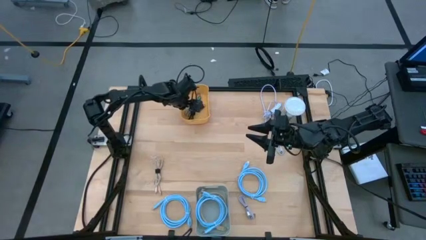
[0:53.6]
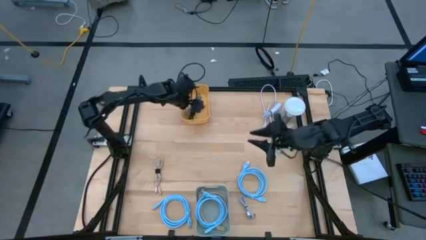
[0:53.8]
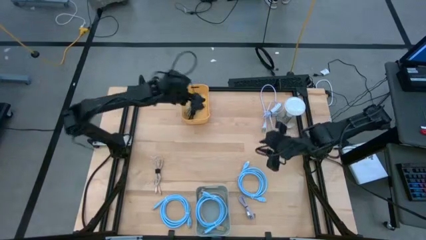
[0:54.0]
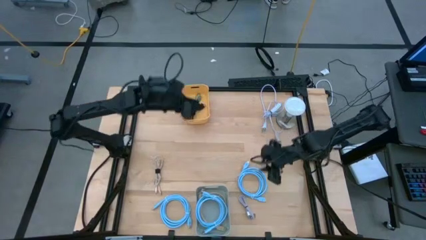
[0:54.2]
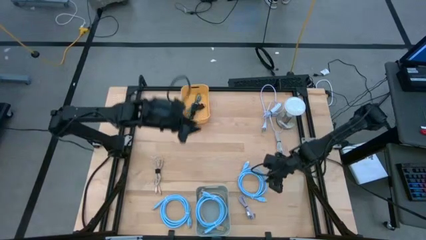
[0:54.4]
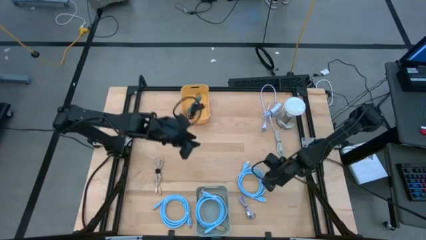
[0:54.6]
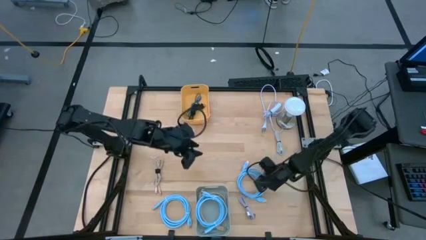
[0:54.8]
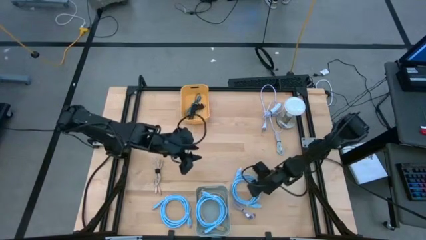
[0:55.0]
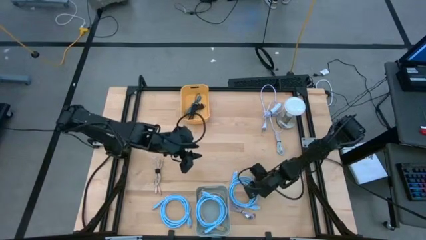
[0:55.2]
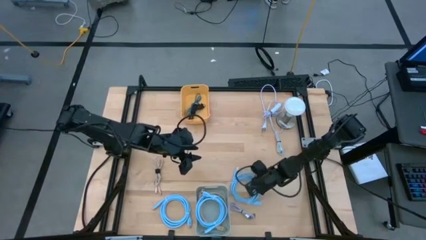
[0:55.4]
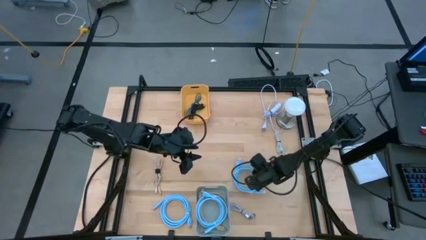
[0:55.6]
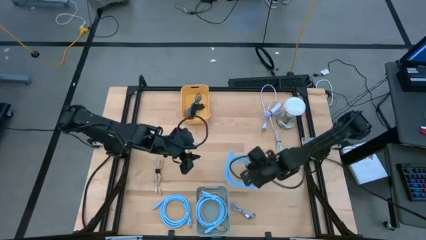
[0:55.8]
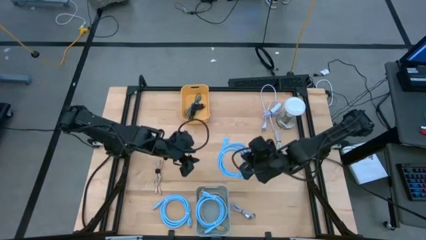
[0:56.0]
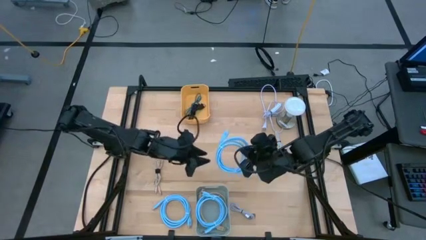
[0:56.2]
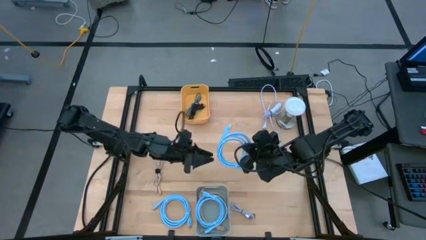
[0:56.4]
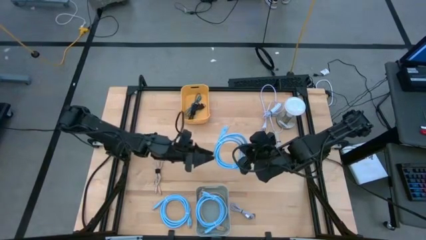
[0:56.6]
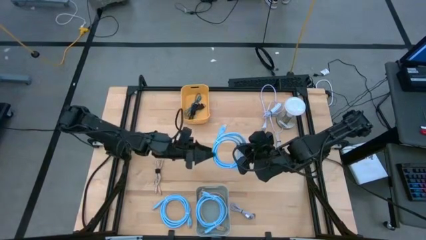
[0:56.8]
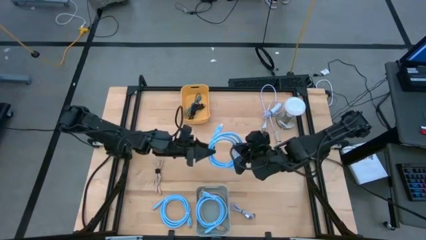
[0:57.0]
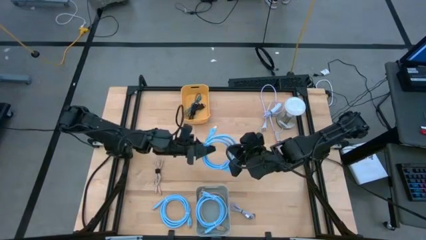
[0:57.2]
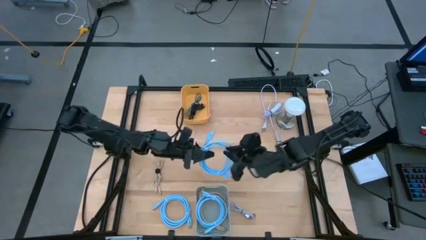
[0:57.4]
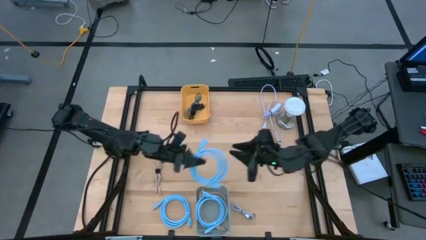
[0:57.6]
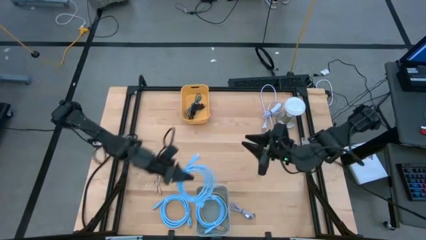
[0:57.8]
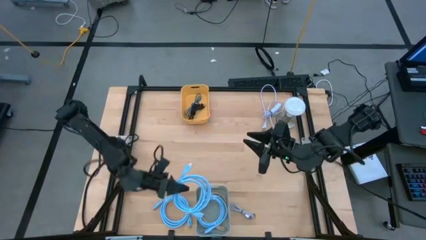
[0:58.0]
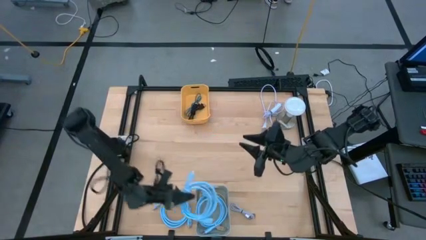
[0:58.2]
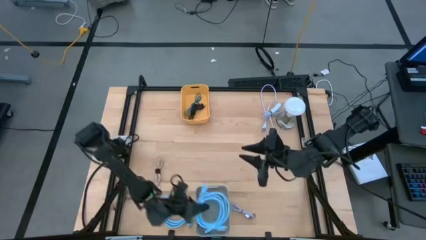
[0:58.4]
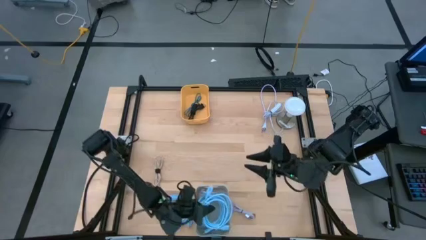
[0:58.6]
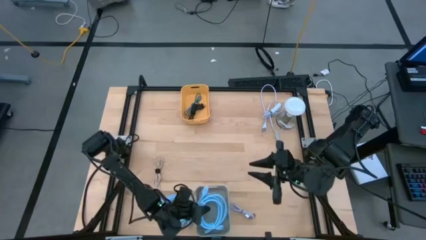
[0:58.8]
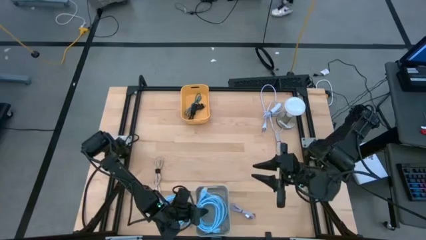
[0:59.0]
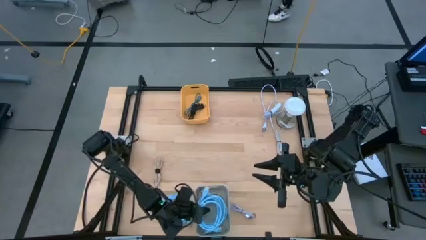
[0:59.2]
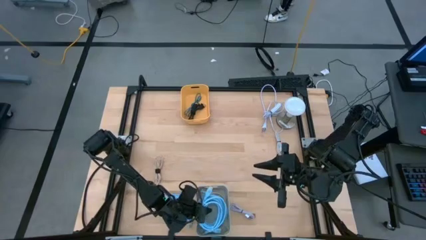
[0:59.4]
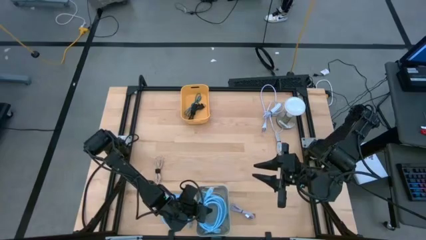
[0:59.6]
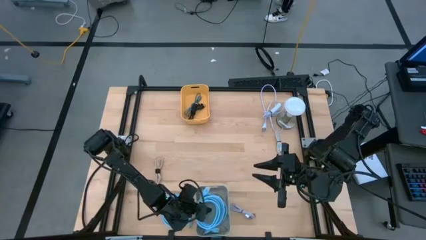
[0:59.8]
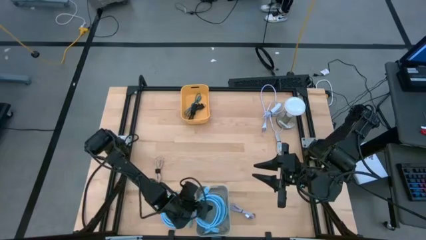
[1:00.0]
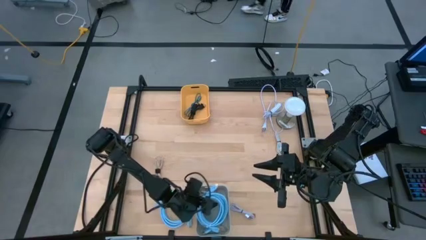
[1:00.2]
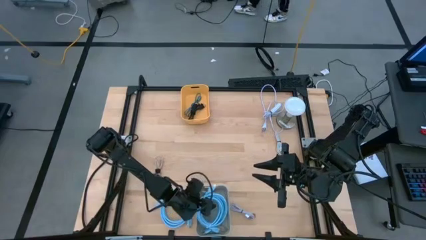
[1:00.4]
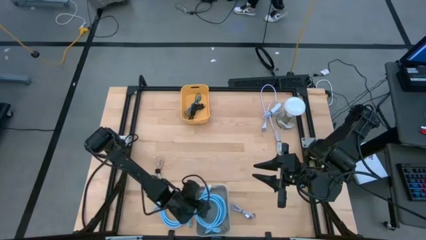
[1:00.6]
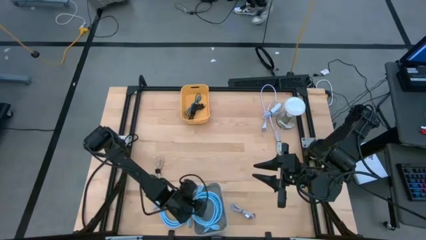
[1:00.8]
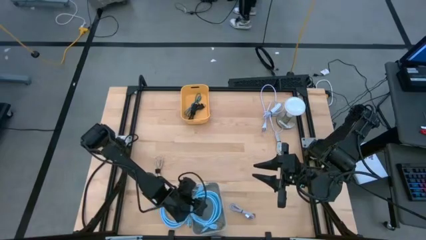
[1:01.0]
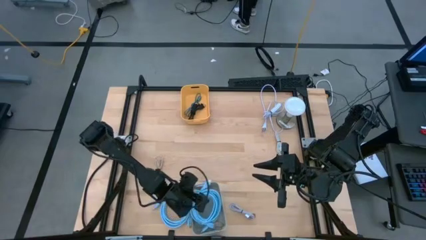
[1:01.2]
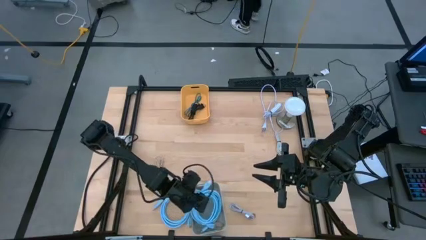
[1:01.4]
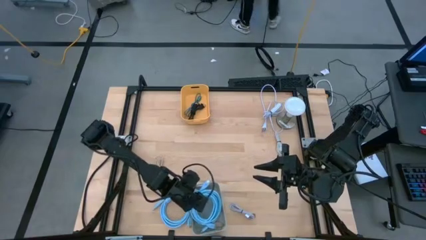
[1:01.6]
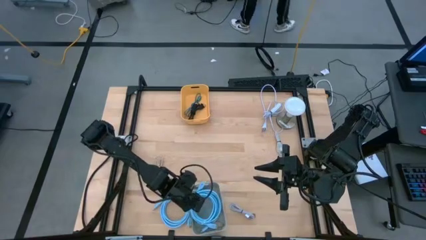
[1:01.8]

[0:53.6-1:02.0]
Task: Pick & Place USB Port
Put the right blue video cable into the gray bin

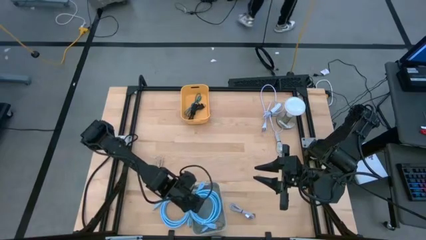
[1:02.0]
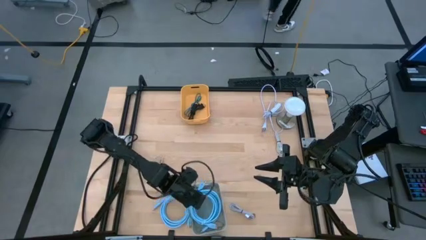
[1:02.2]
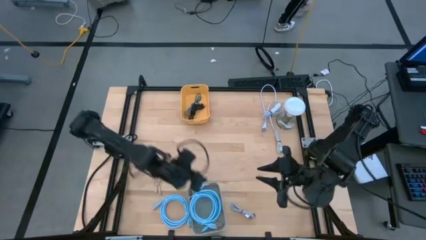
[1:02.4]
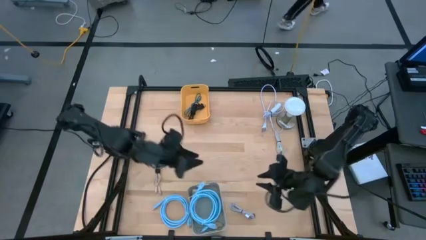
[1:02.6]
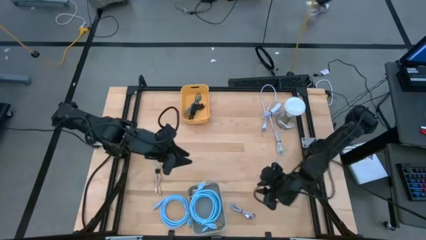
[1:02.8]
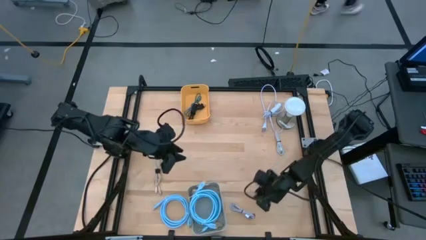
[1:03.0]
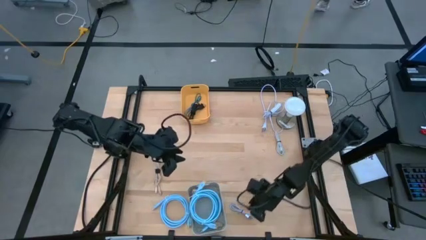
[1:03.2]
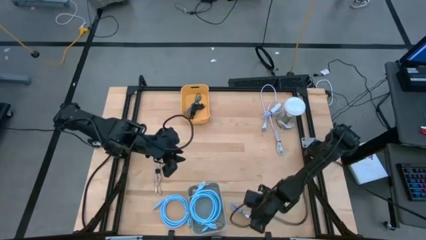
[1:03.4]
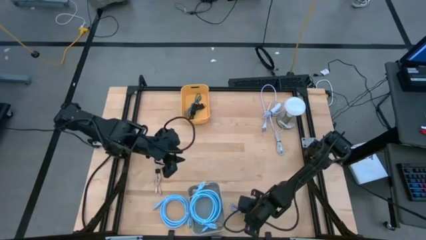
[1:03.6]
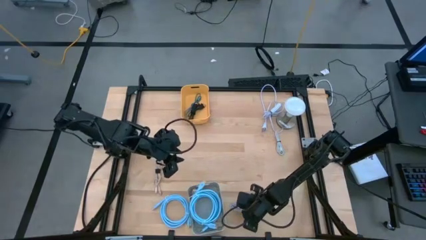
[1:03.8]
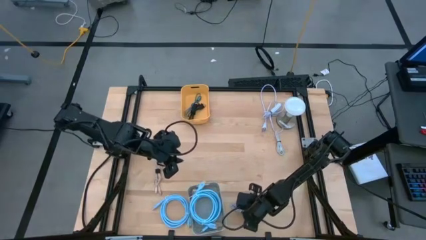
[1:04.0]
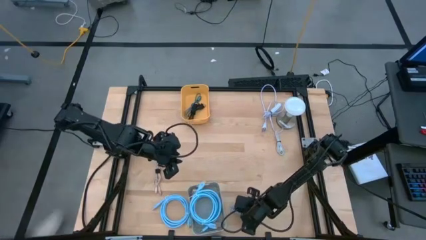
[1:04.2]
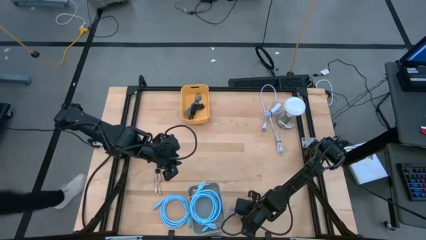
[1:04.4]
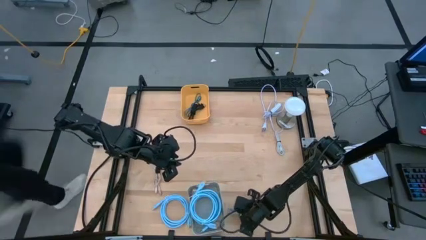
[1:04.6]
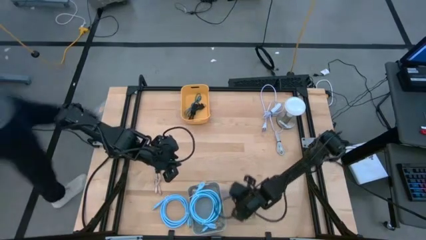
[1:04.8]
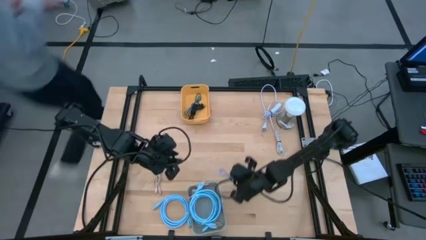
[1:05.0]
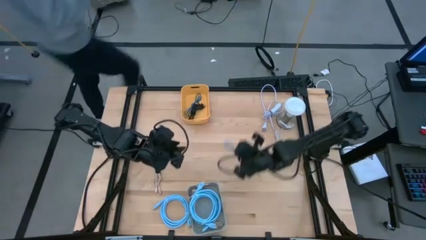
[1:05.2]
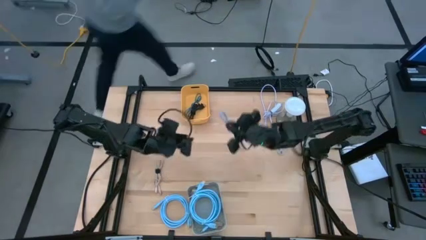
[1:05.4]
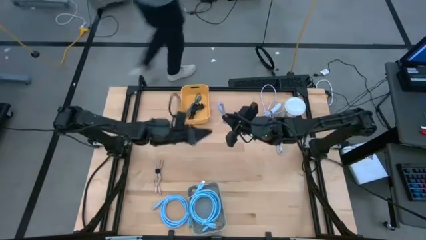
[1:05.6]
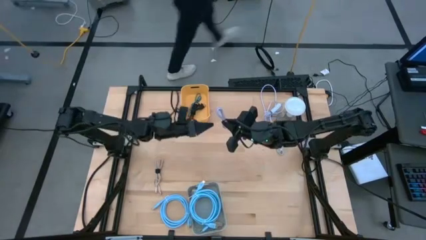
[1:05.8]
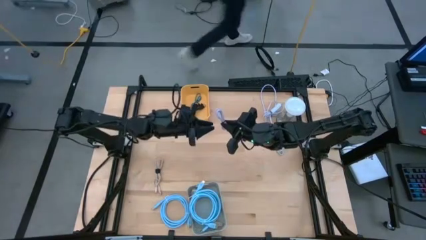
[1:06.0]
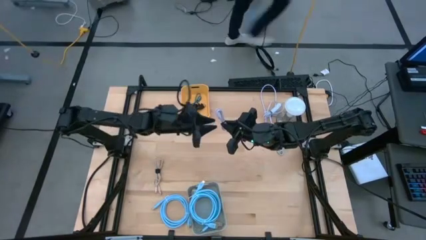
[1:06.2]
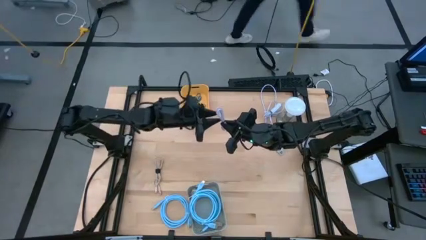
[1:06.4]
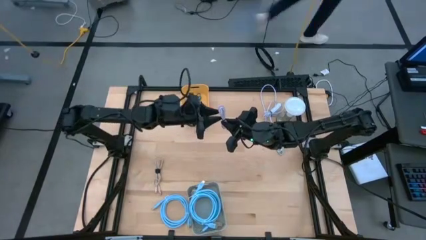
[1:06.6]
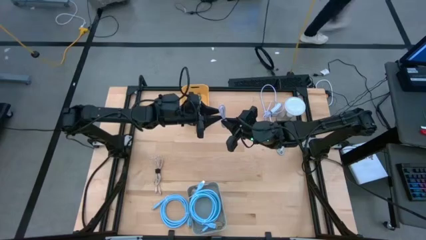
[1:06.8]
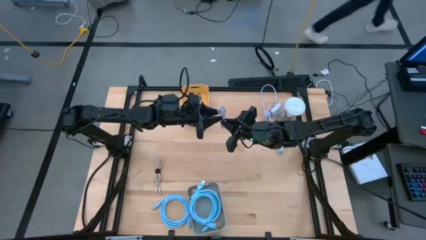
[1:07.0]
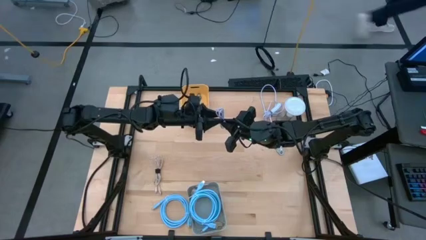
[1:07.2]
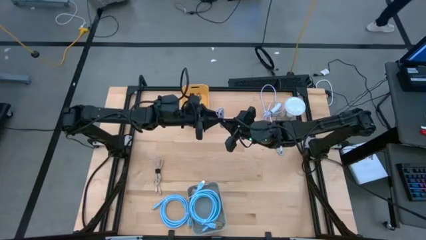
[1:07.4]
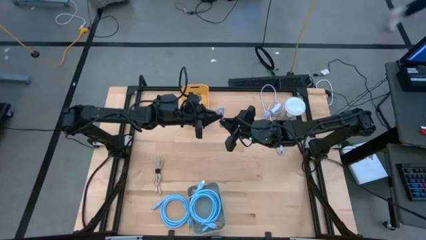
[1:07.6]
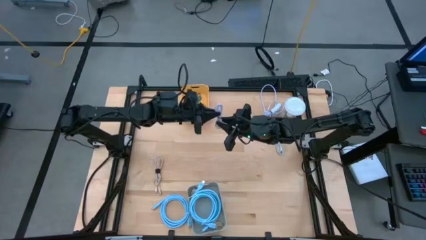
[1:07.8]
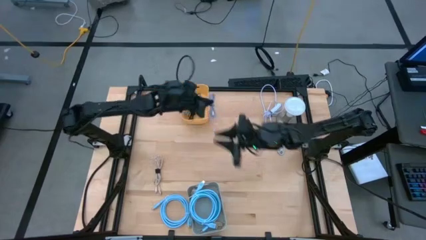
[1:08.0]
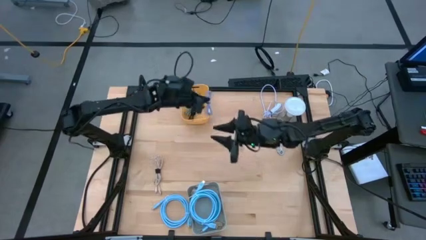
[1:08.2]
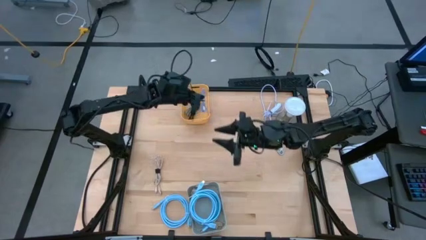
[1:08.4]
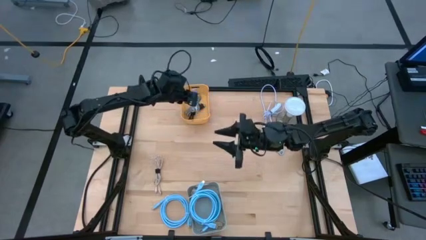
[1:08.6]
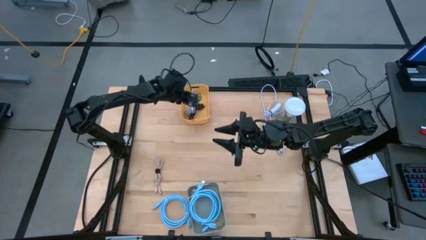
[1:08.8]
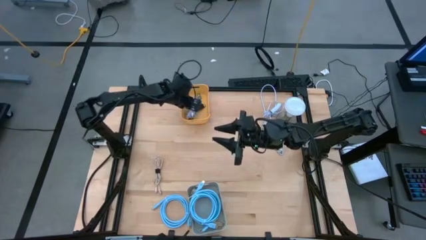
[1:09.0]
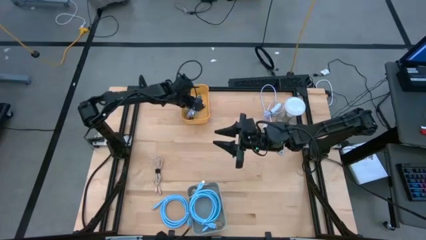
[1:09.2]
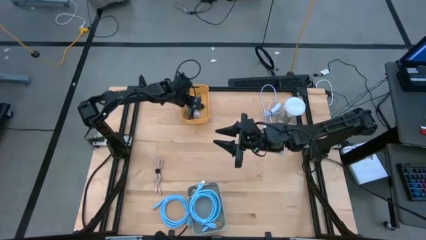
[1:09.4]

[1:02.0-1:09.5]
Put the purple charger cable into the yellow bin

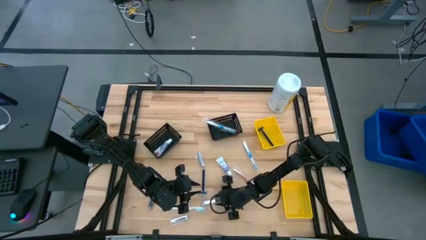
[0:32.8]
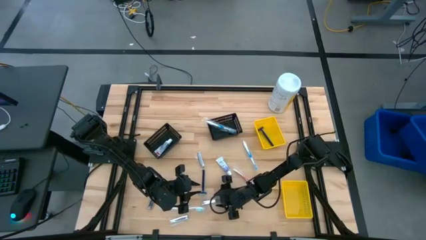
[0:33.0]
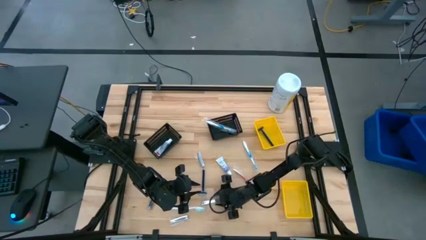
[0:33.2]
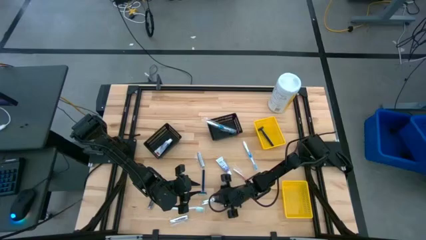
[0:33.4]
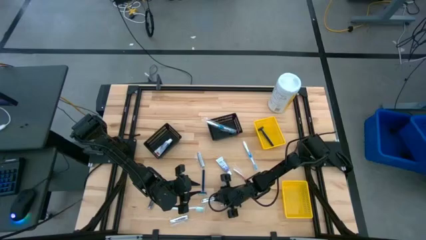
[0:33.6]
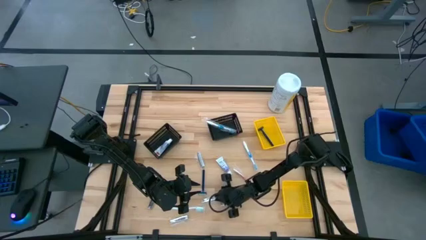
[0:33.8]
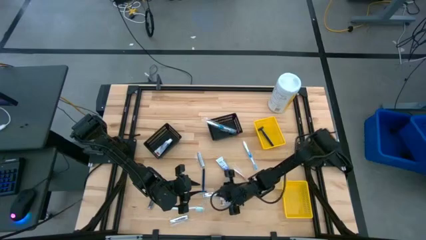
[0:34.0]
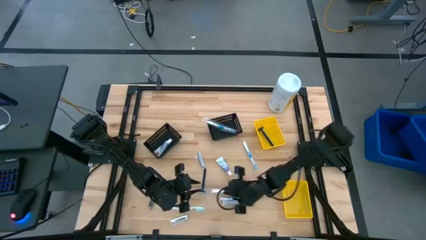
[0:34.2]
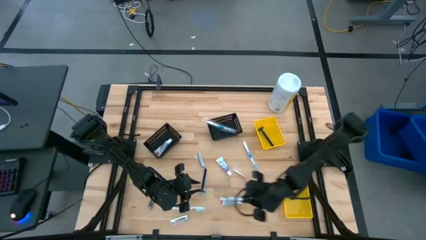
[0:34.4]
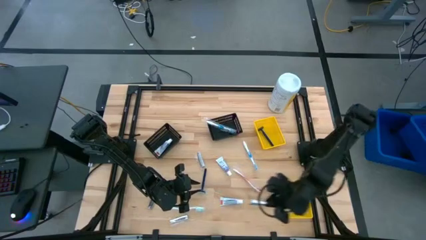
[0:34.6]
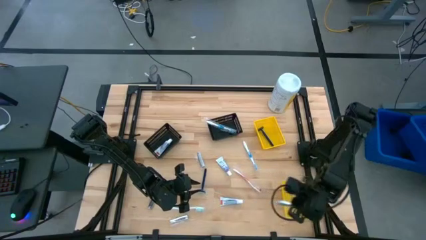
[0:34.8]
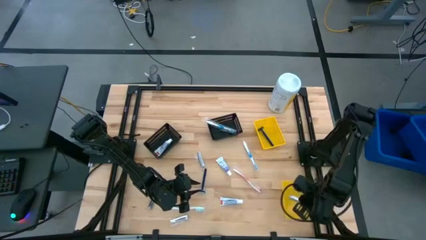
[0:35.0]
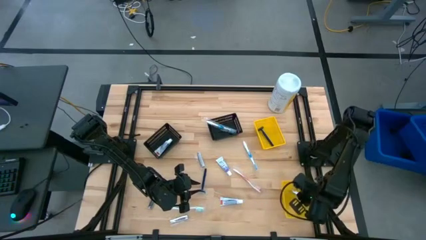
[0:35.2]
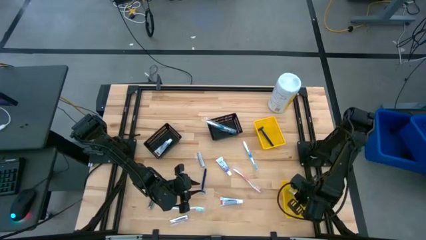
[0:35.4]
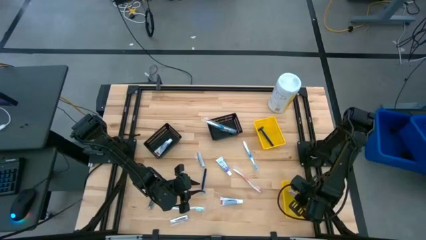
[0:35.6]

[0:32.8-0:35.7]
Task: Pick & Place Travel size toiletries
Put the silver nail cutter into the bottom yellow basket
